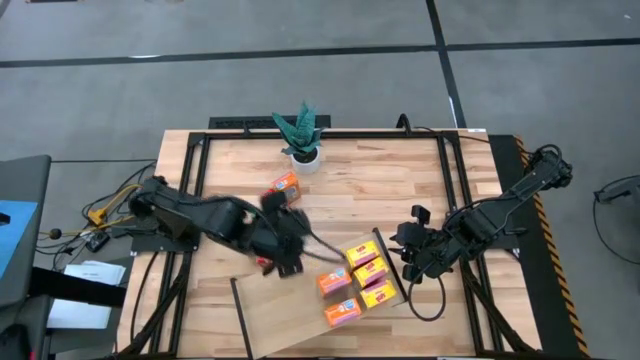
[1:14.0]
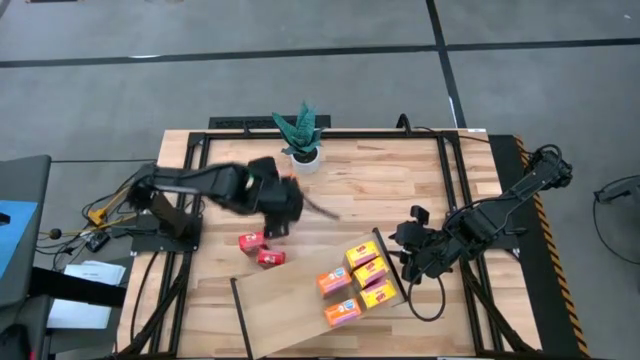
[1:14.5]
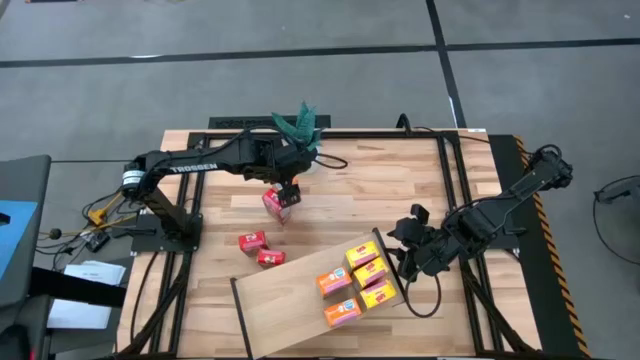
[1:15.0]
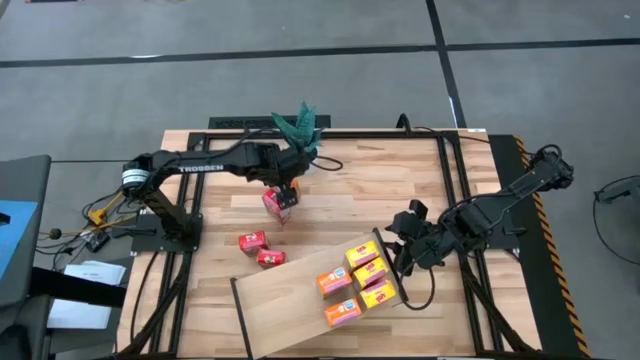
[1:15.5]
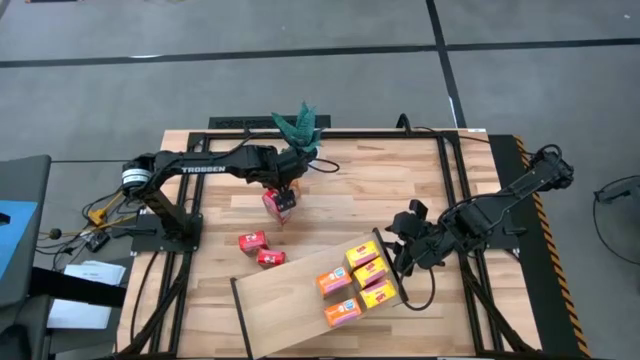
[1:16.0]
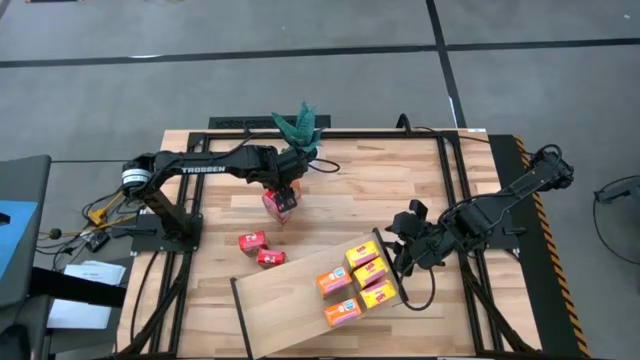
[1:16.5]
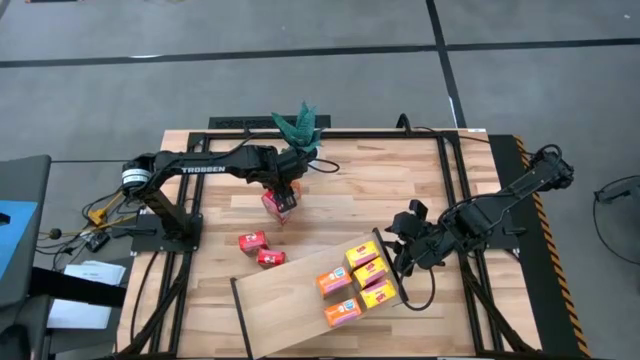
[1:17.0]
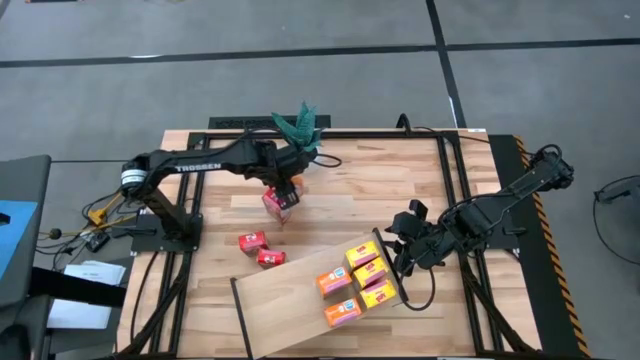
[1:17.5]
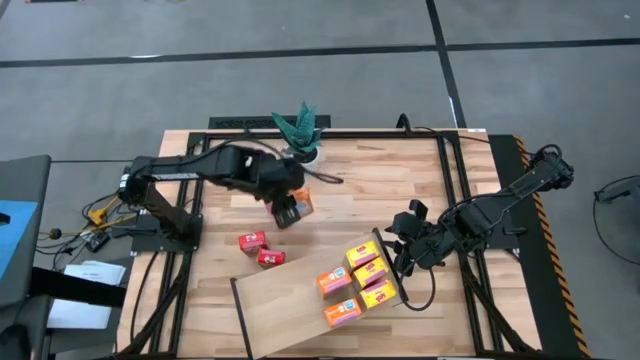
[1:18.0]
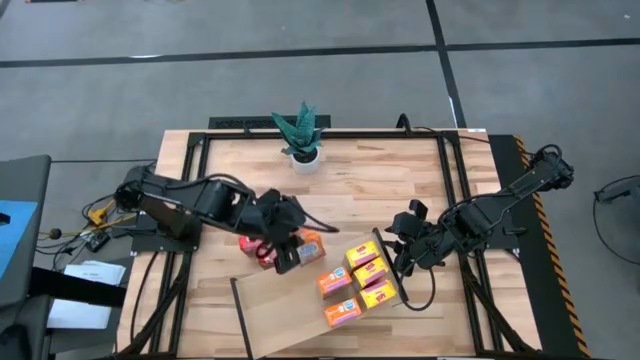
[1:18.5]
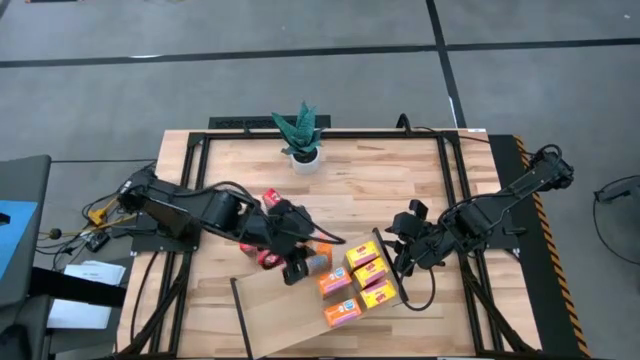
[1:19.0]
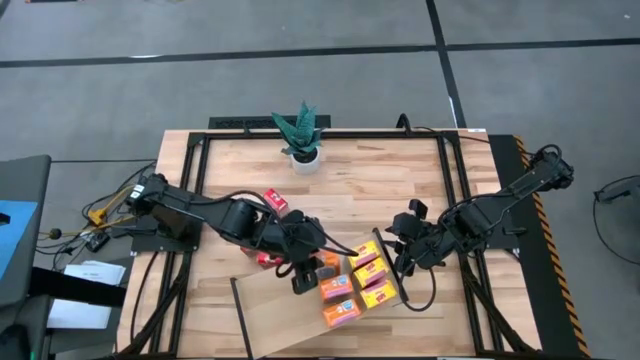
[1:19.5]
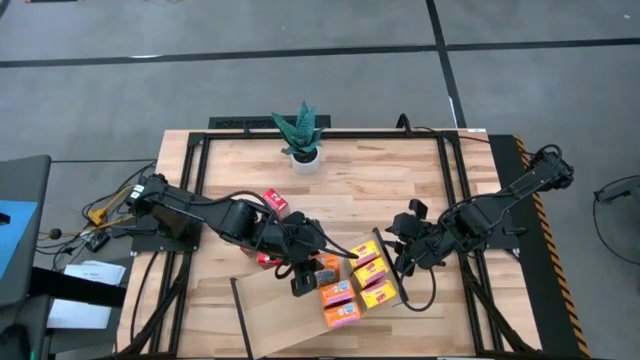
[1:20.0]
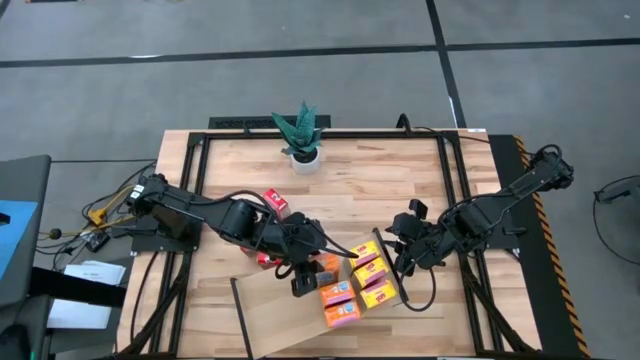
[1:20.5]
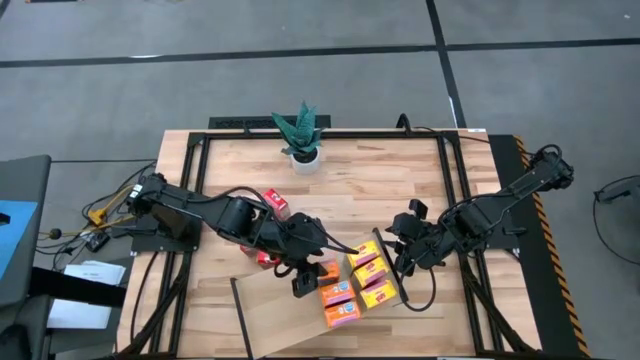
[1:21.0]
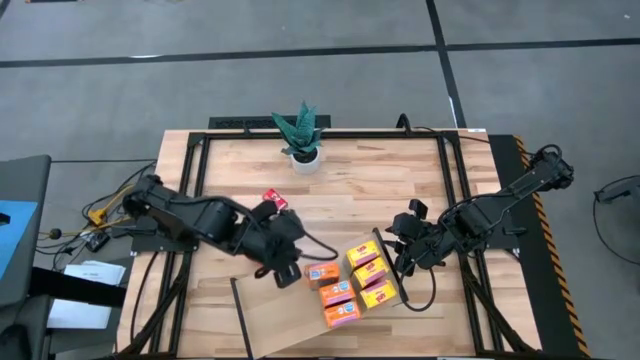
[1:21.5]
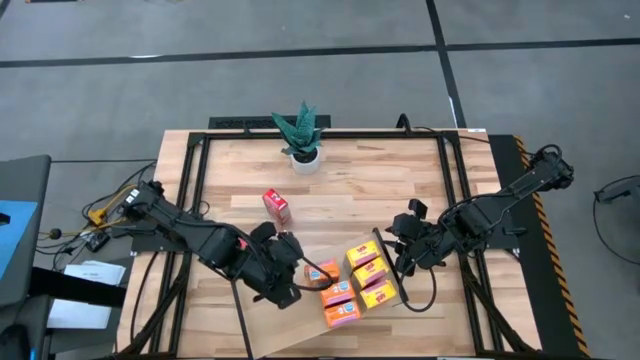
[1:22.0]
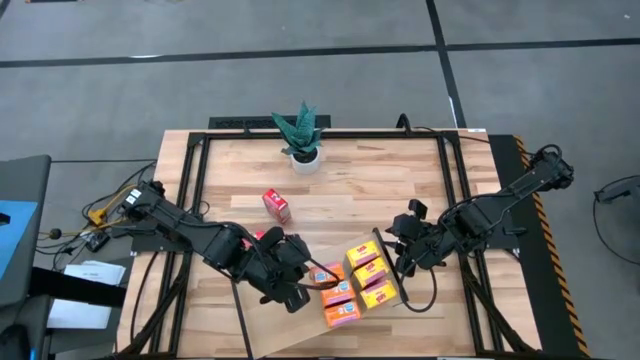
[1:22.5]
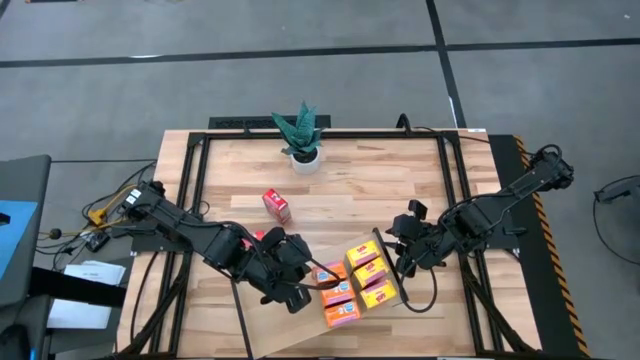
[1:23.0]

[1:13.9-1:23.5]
Task: Stack cereal on shelf
Put the orange cereal box on the shelf aligned with the orange cereal boxes

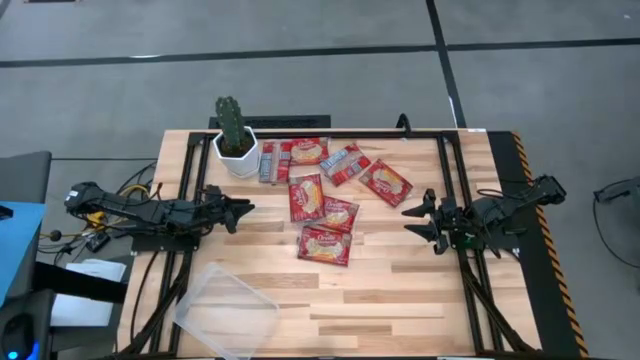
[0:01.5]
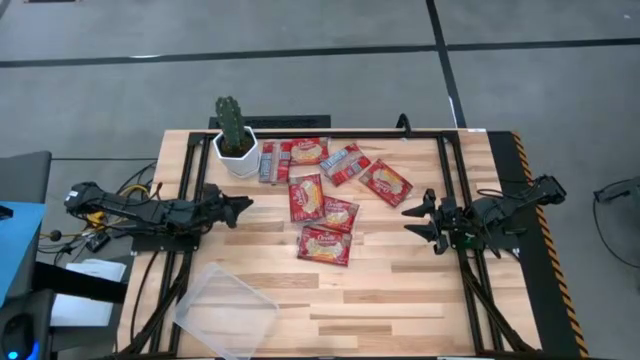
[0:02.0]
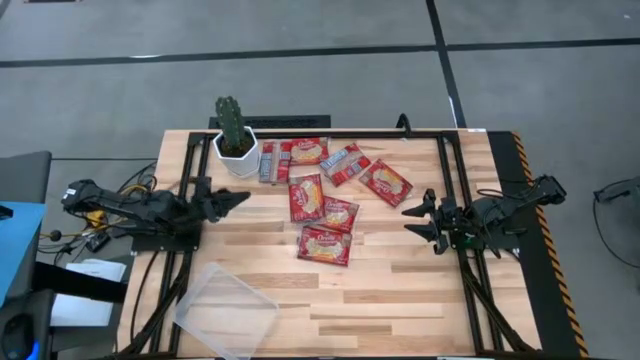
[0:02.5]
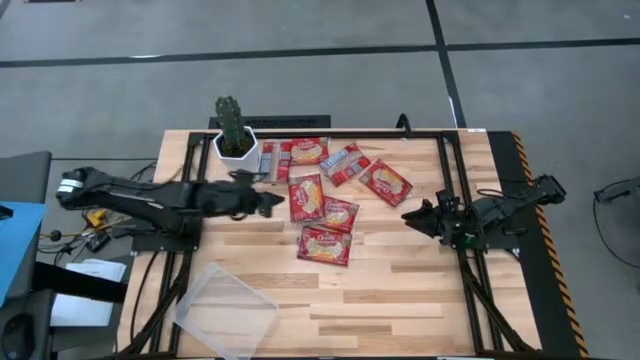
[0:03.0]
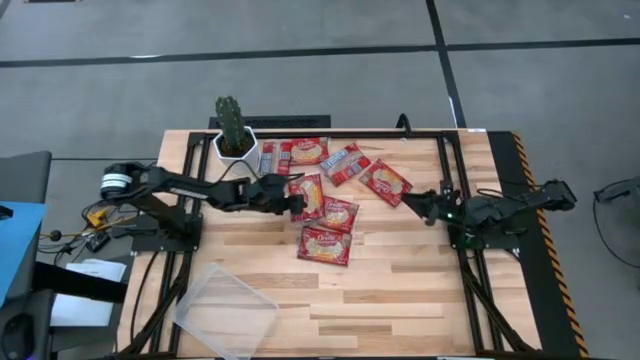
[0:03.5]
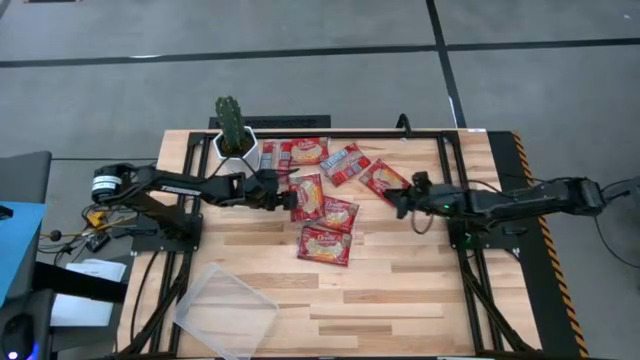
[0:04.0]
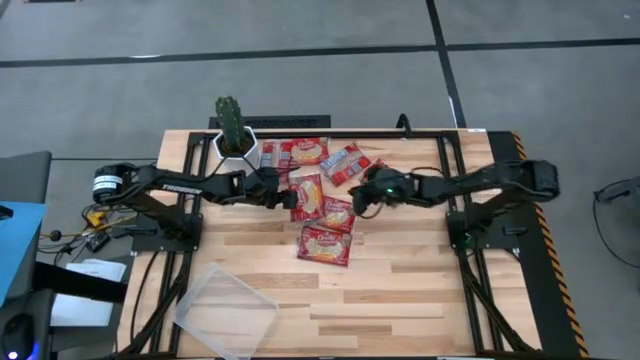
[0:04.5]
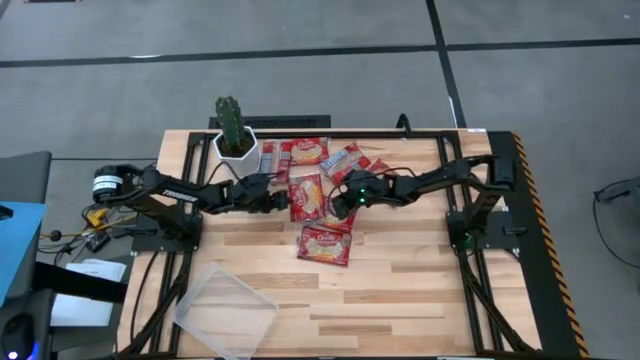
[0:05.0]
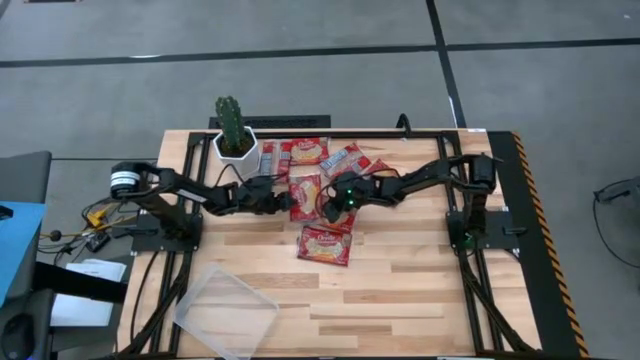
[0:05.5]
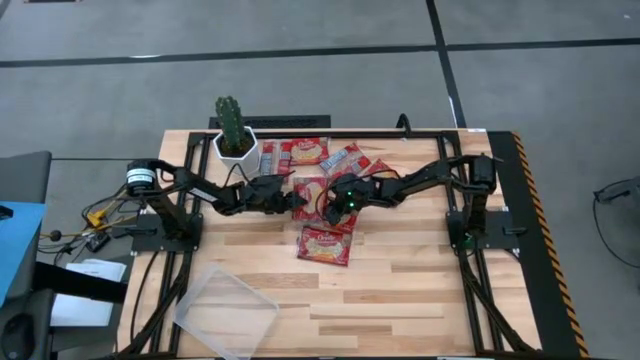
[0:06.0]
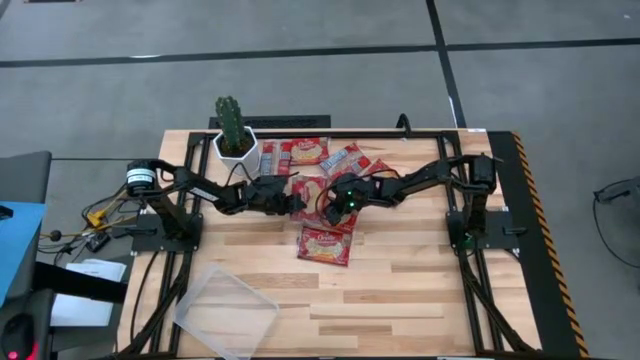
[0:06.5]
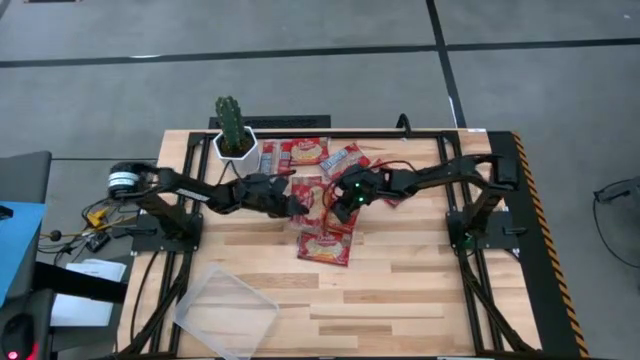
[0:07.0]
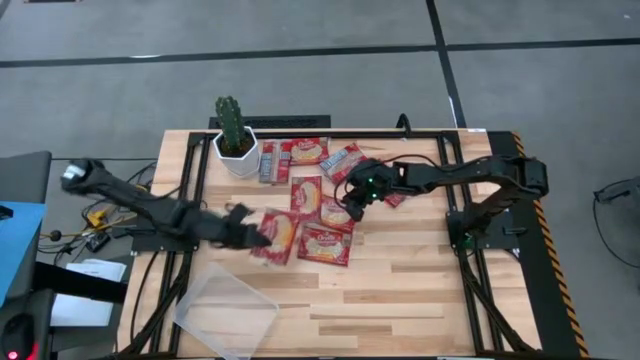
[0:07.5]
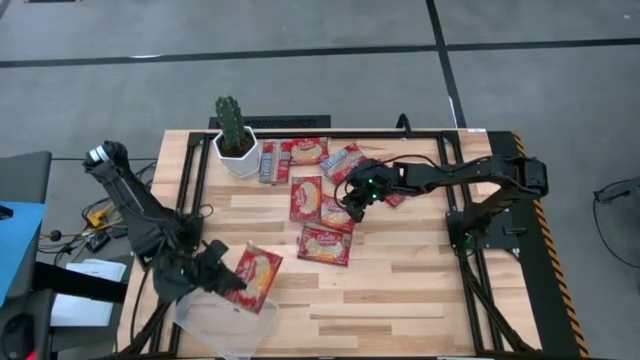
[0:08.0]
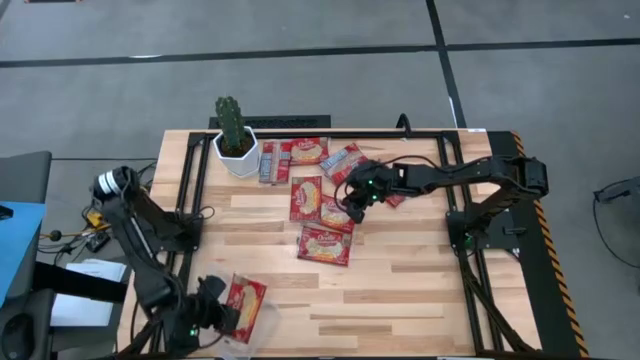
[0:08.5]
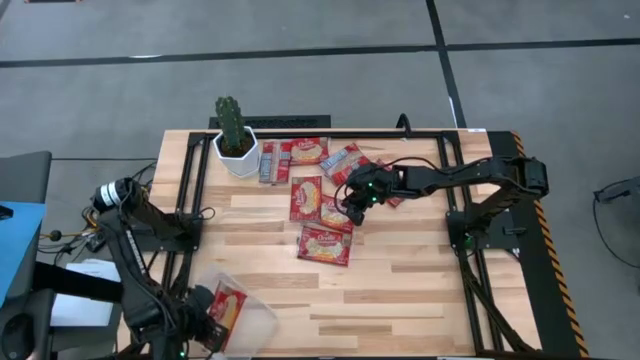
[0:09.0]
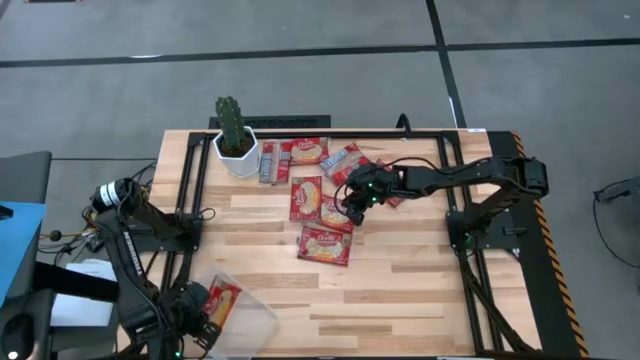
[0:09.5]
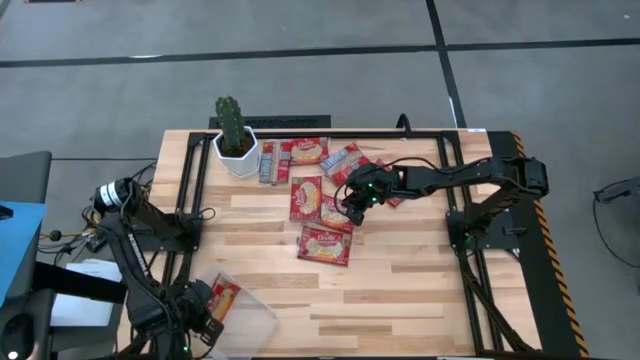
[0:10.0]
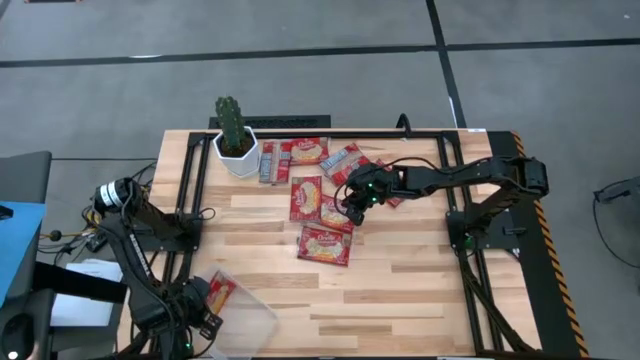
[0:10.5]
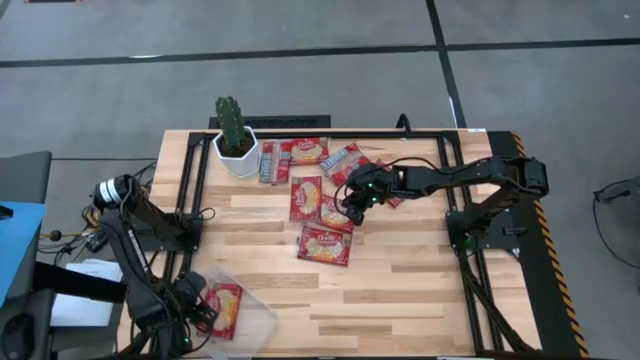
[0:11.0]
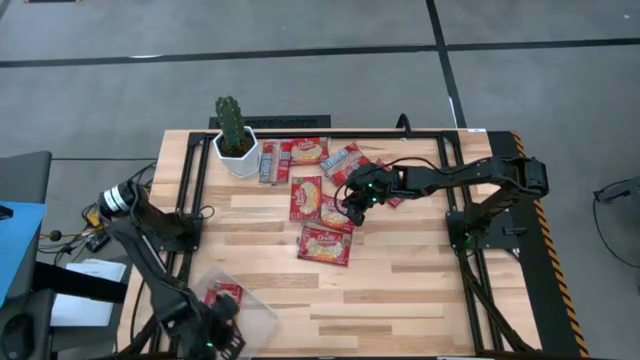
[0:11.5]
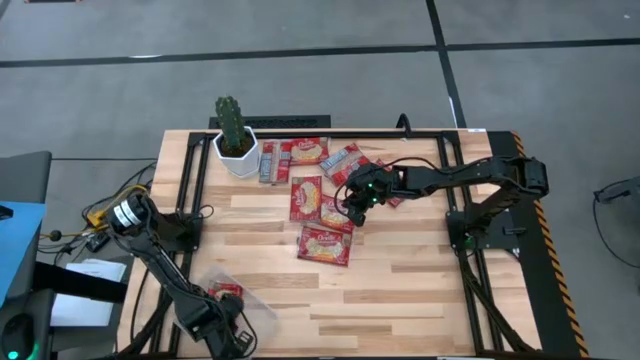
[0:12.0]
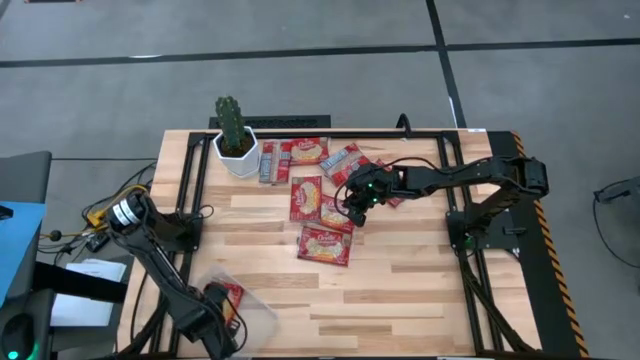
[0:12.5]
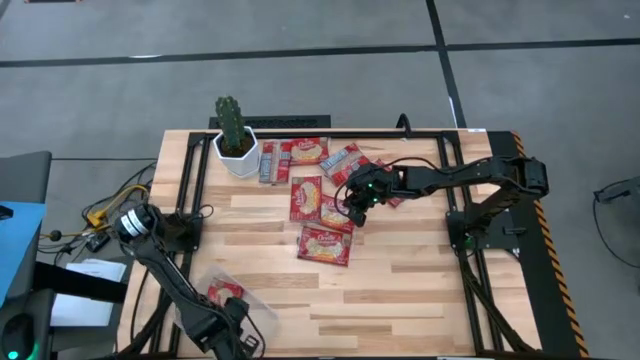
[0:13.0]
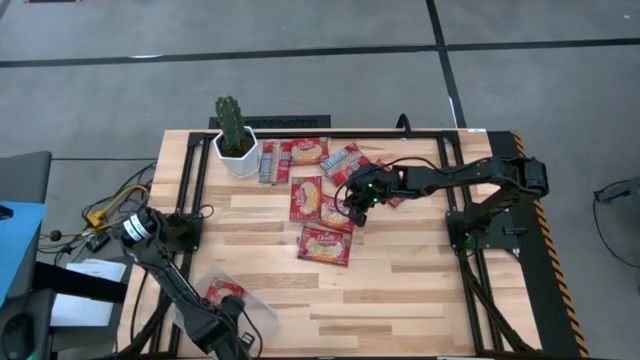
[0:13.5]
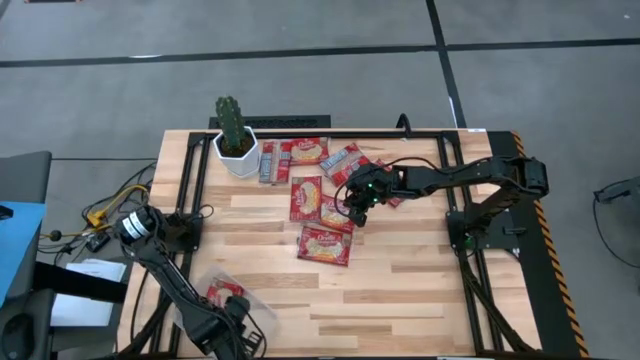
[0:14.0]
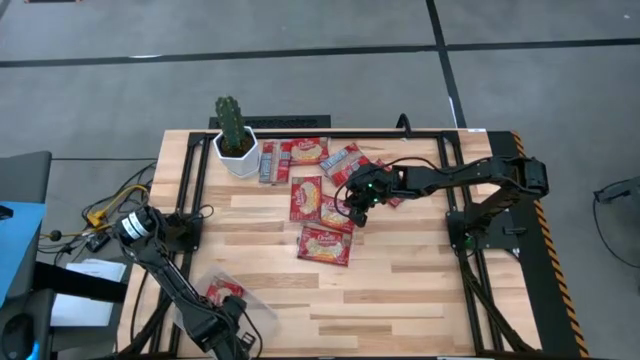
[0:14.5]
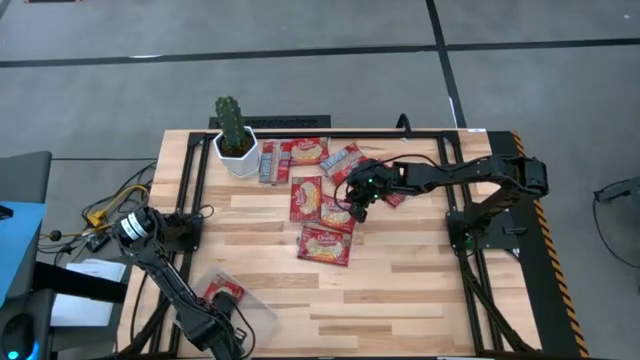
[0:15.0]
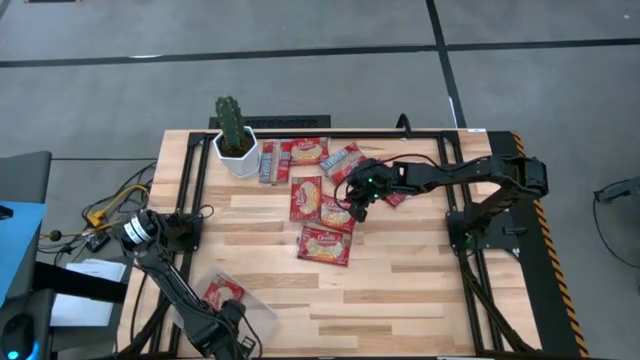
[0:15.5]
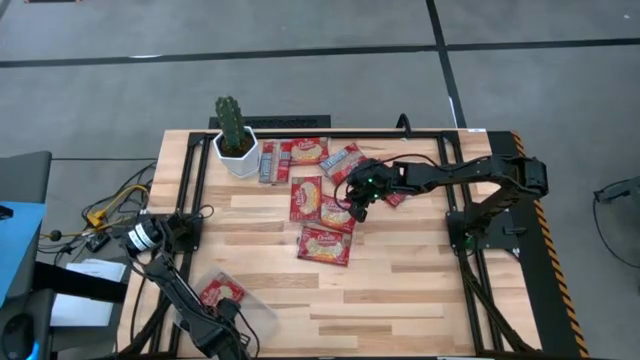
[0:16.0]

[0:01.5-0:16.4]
Task: Sort popcorn bags into baskets
Put the red popcorn bag into the transparent bin
